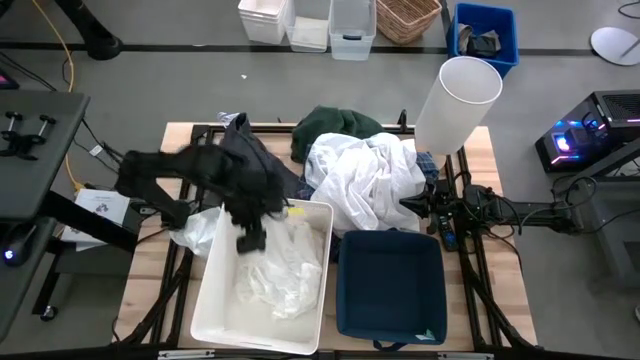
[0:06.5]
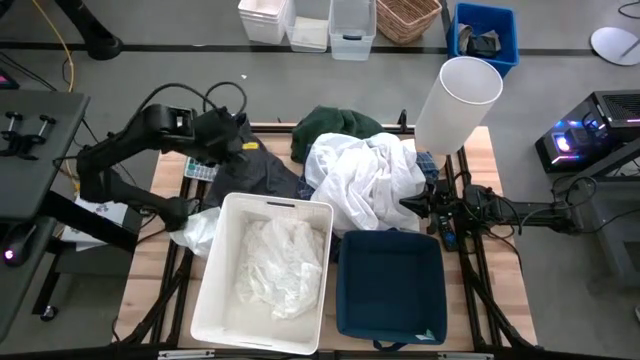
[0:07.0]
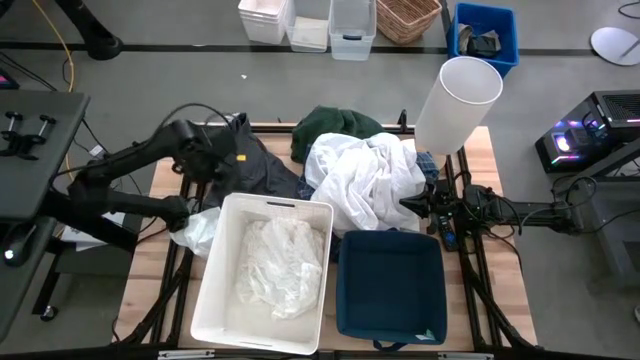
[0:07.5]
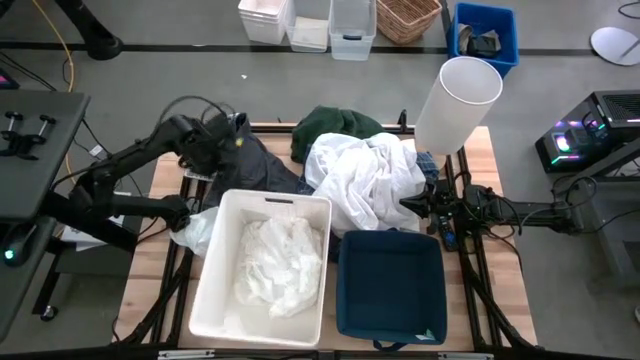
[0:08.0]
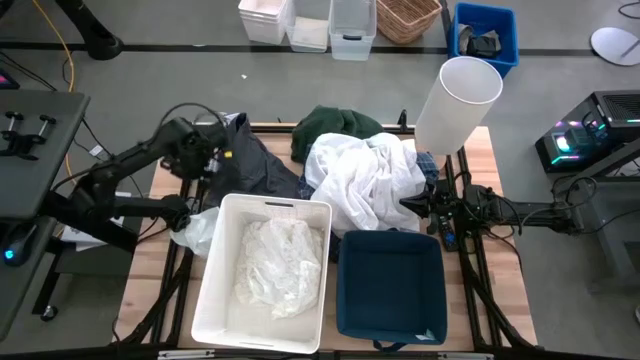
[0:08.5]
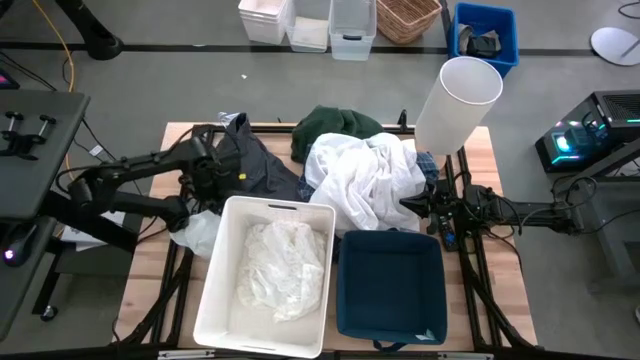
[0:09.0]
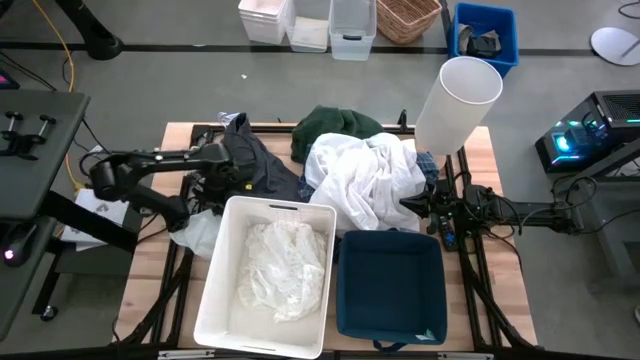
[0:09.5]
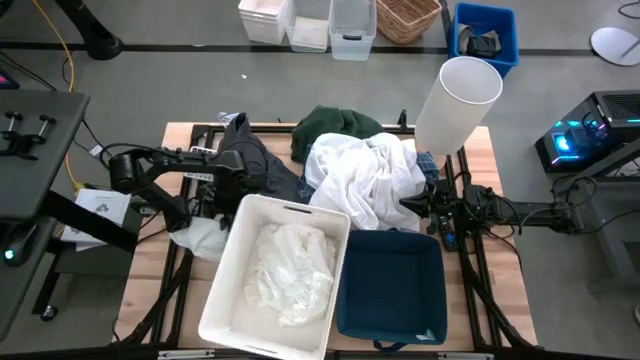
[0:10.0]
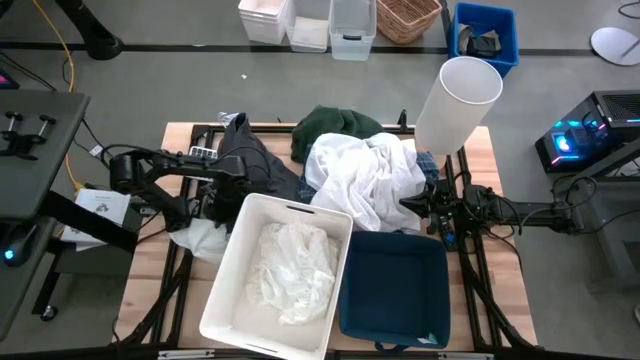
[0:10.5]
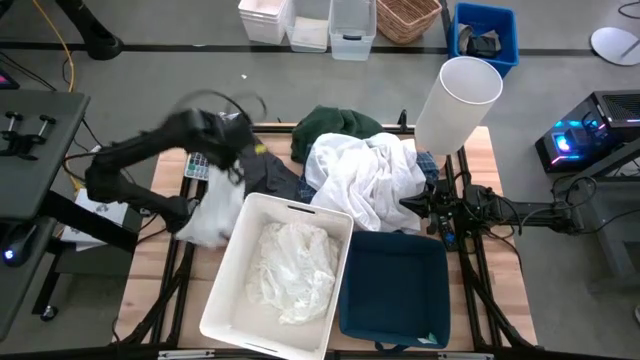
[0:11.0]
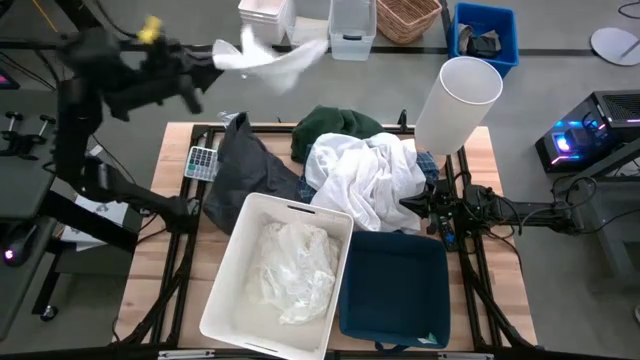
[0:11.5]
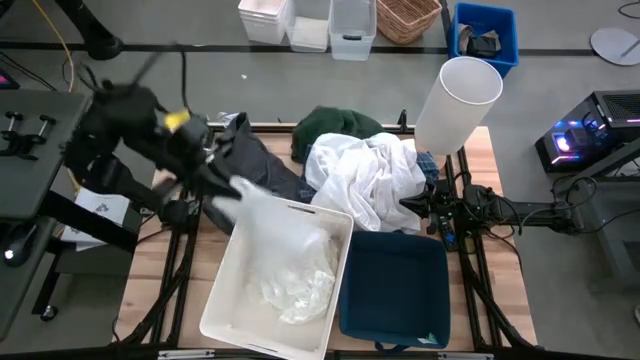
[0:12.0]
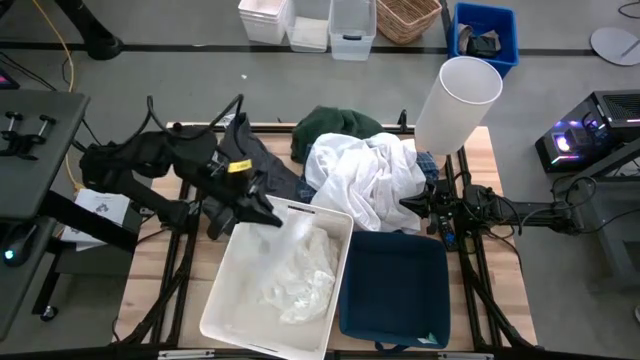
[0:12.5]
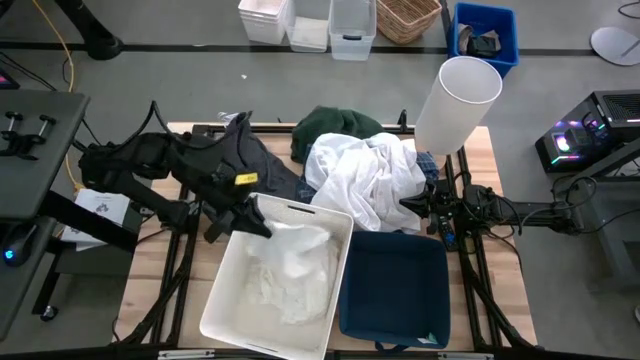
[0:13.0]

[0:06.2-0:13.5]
Task: Sort clothes
Put the white pants into the white laundry bin

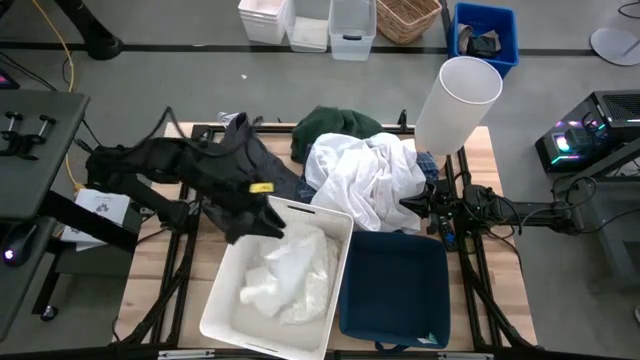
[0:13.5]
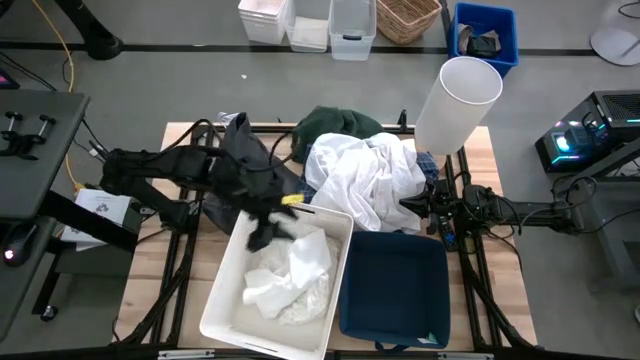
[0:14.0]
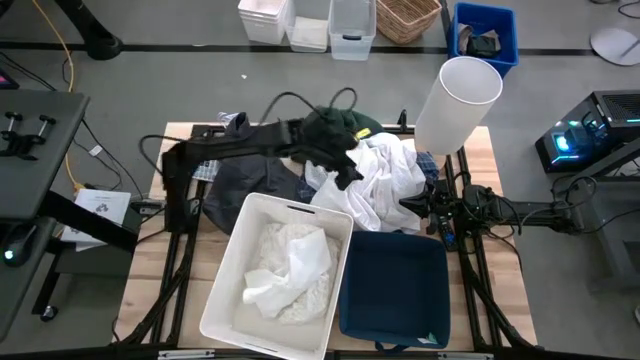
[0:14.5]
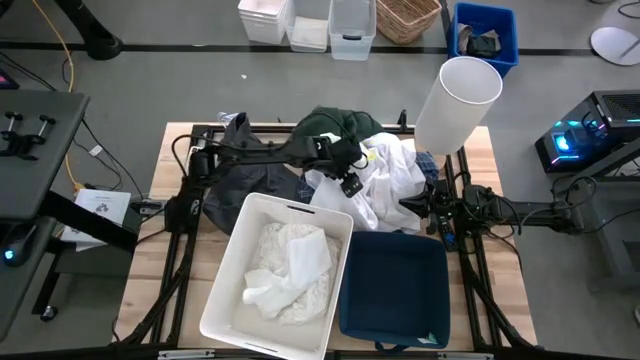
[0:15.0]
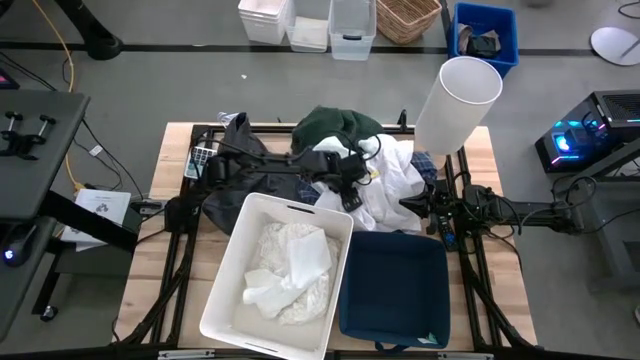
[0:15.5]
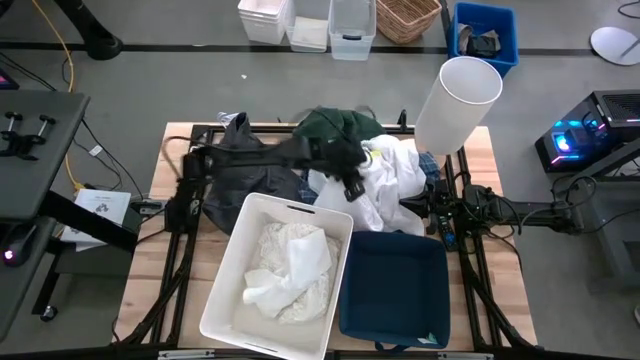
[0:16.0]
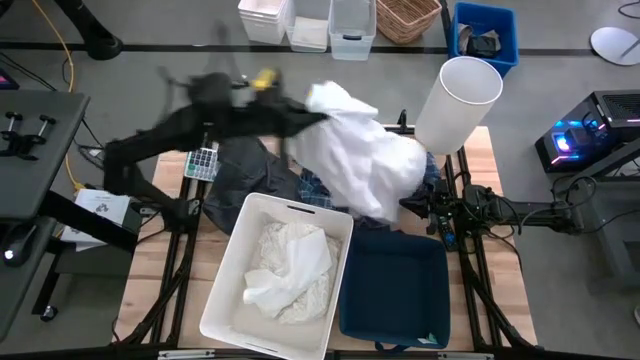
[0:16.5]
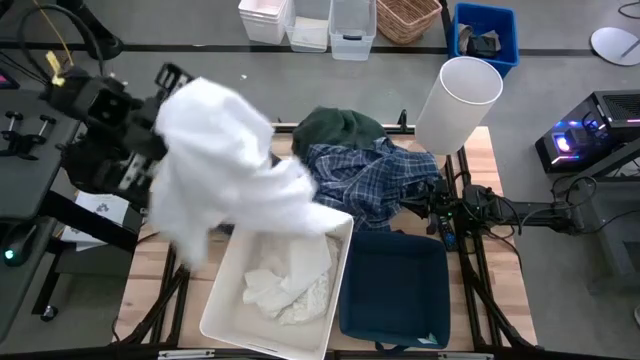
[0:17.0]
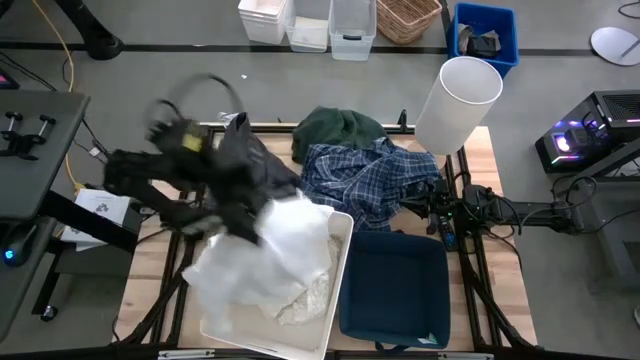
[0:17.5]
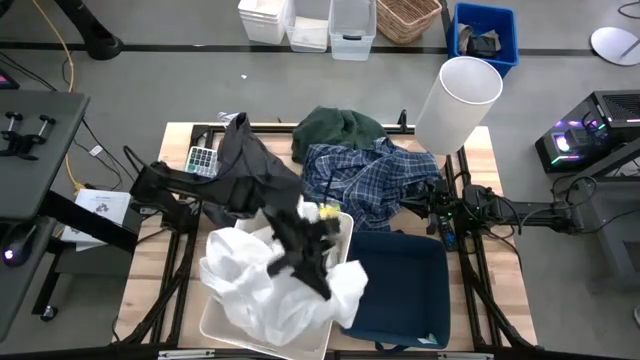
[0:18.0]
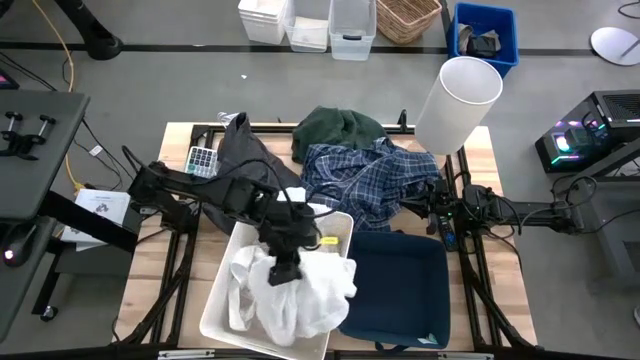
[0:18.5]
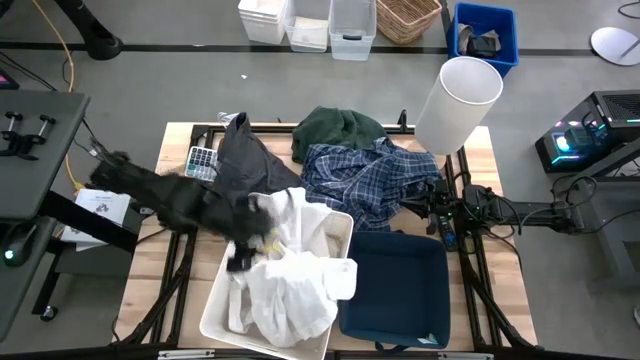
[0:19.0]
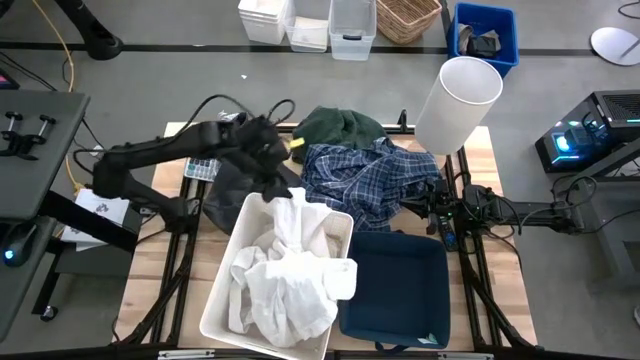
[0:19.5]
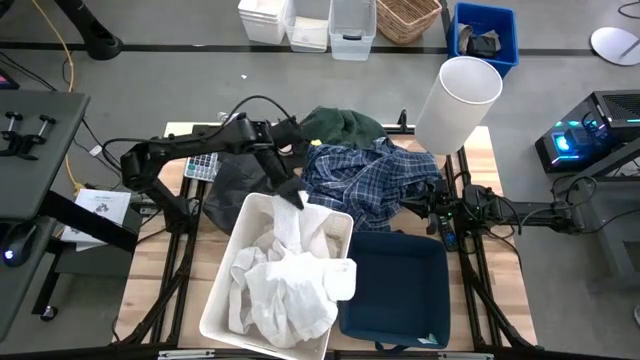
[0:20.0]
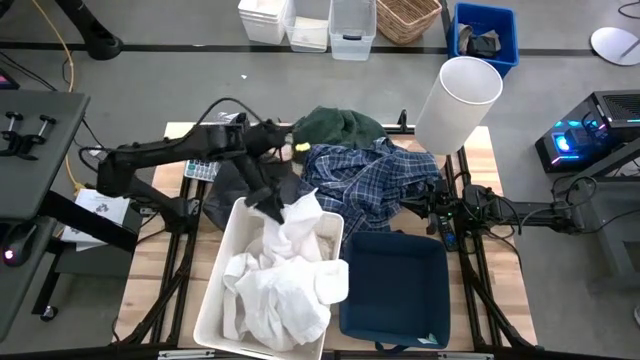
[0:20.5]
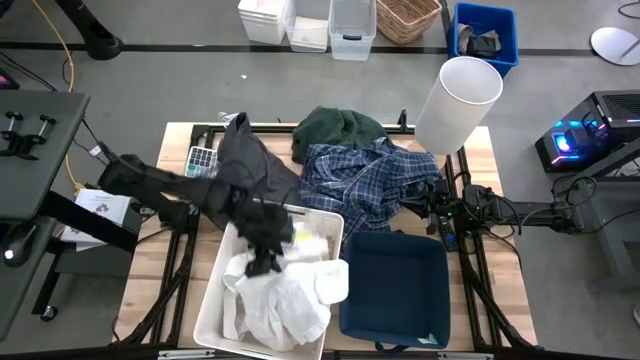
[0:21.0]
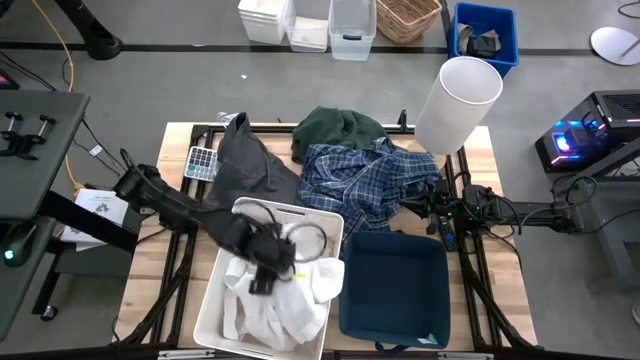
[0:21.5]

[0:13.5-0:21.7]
Put the white polo shirt into the laundry bin

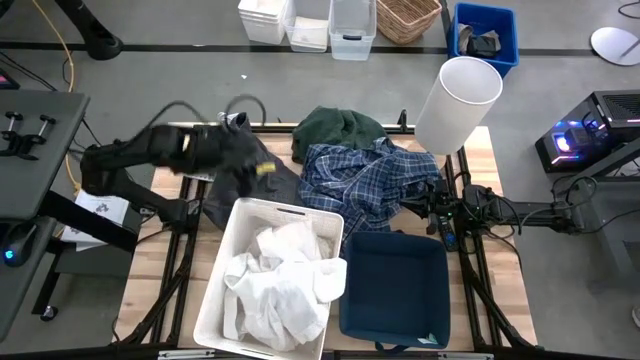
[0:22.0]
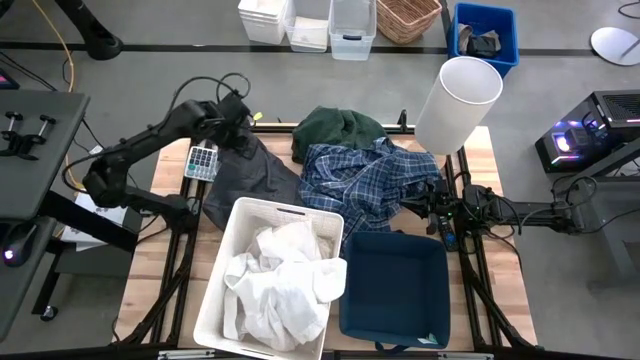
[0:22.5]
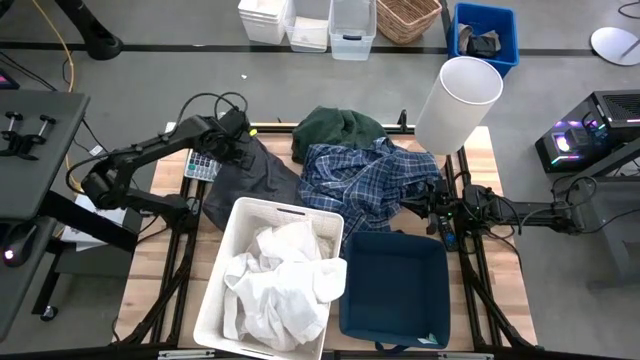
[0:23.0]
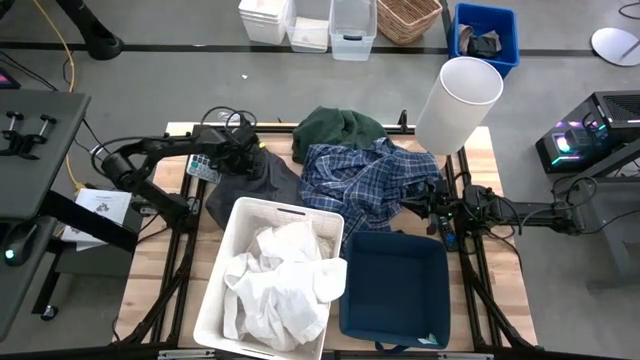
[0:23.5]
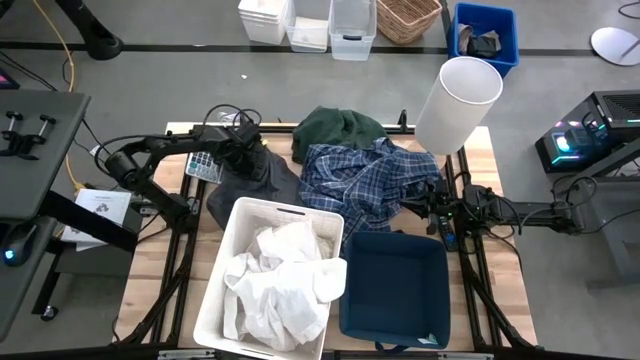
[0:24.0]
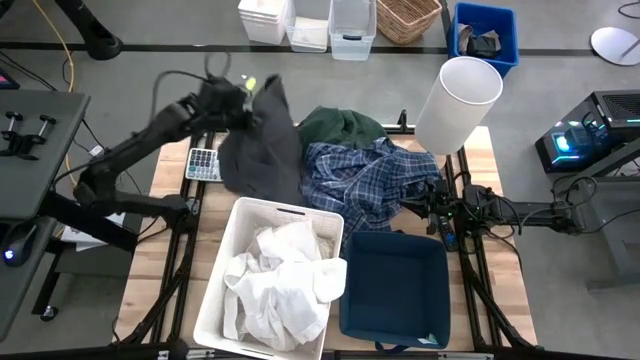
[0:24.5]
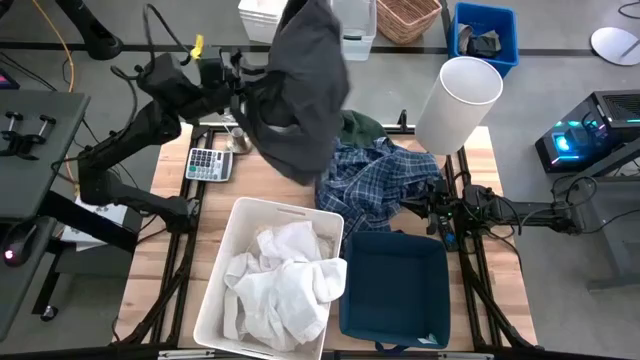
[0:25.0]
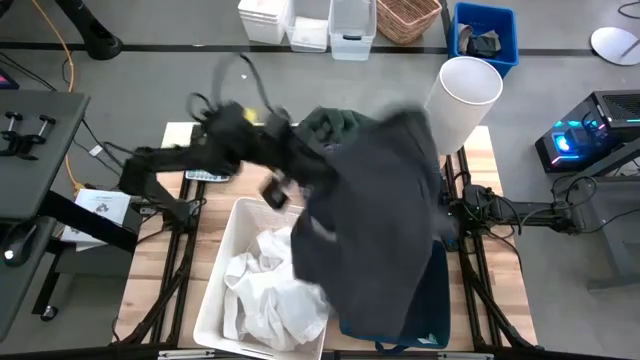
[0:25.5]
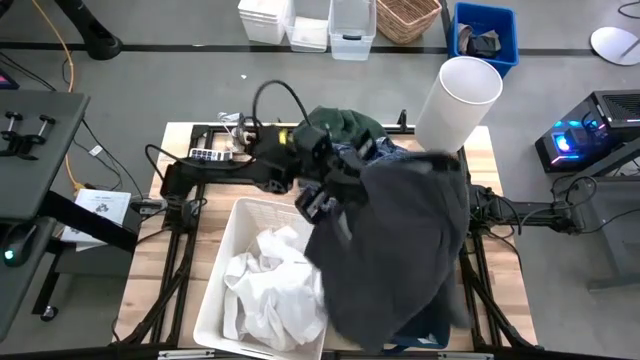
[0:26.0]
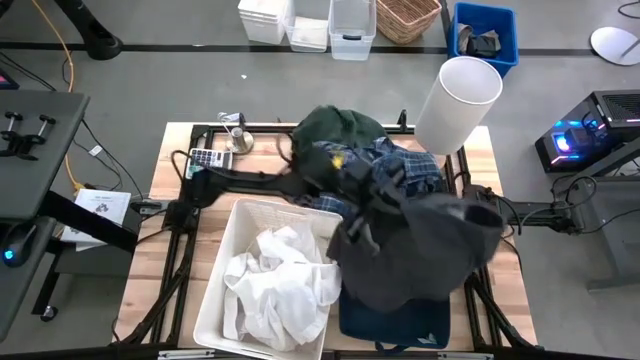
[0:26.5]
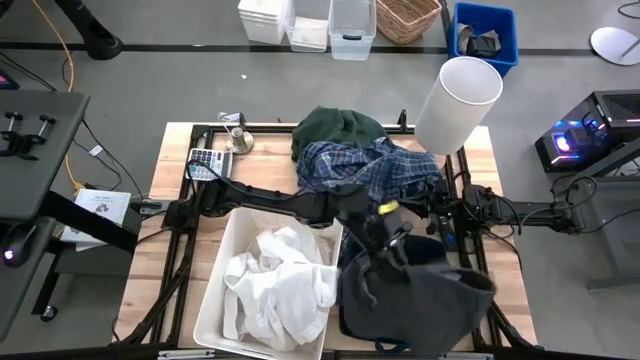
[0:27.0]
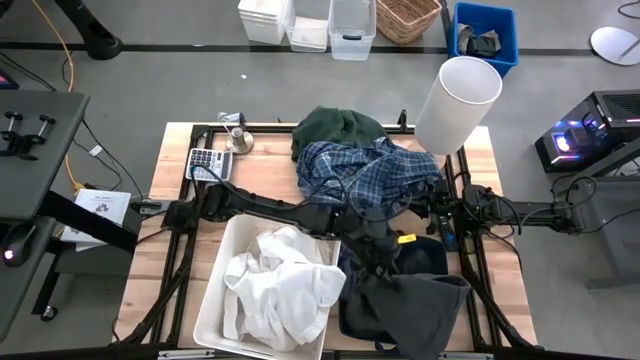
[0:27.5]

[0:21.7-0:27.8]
Put the black shorts into the blue laundry bin
